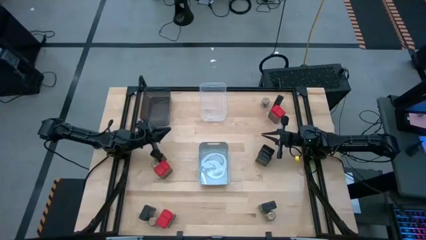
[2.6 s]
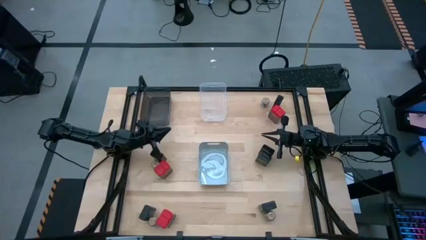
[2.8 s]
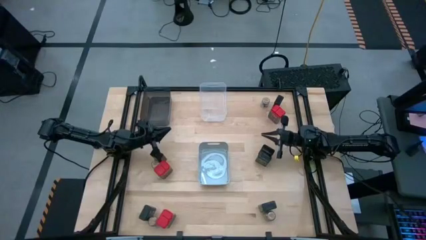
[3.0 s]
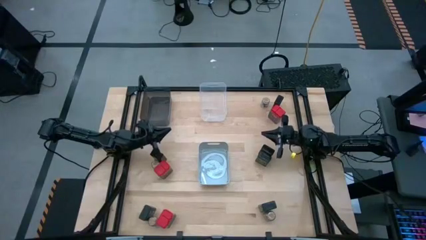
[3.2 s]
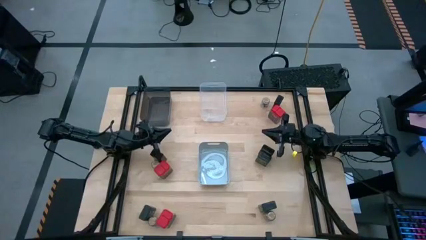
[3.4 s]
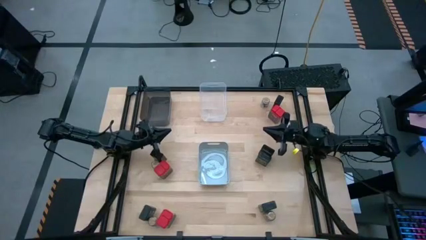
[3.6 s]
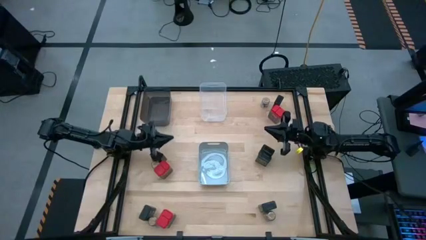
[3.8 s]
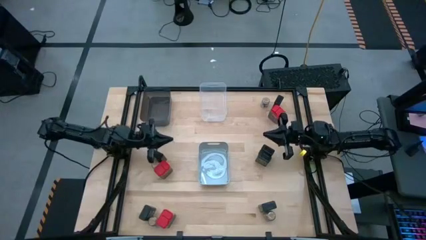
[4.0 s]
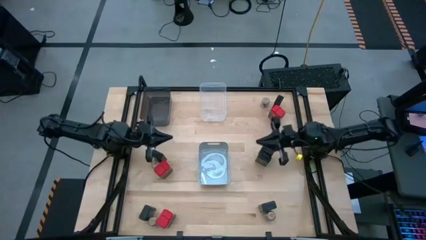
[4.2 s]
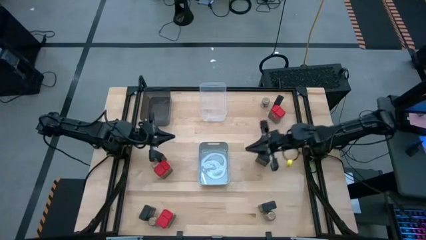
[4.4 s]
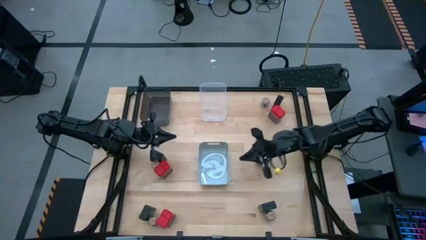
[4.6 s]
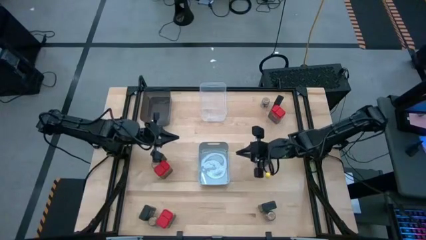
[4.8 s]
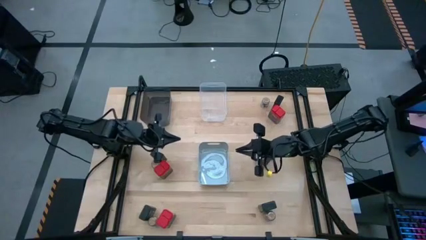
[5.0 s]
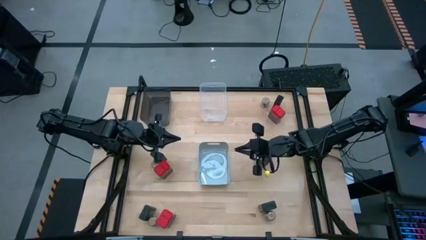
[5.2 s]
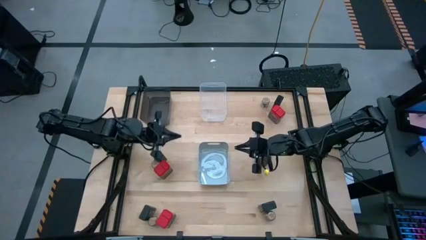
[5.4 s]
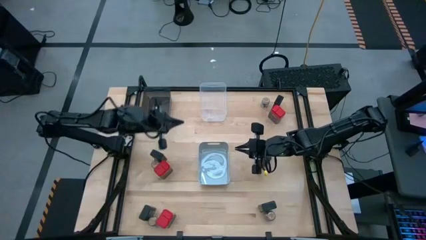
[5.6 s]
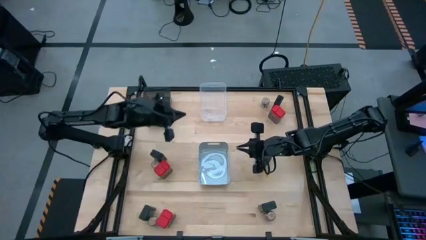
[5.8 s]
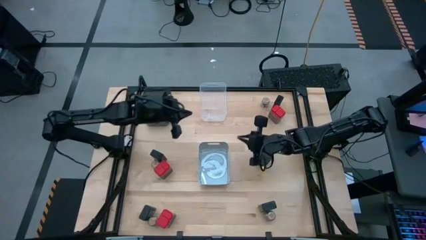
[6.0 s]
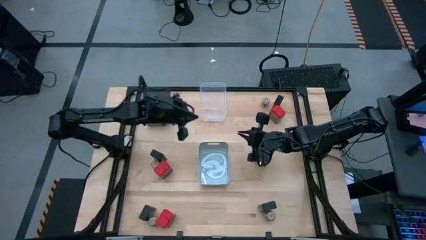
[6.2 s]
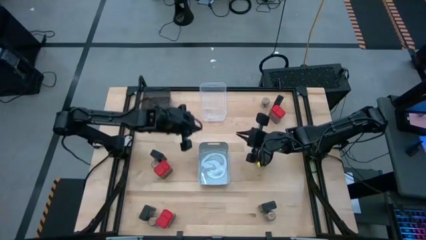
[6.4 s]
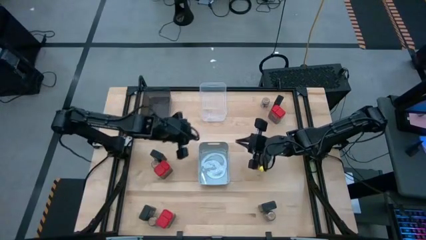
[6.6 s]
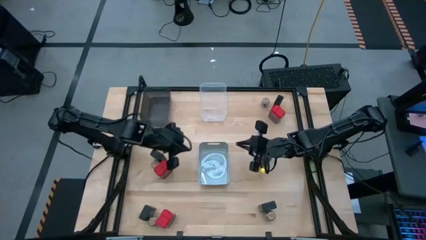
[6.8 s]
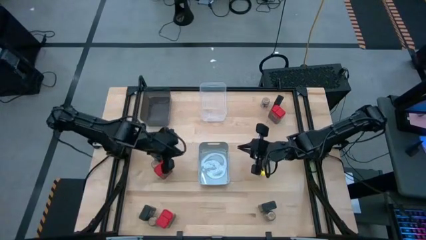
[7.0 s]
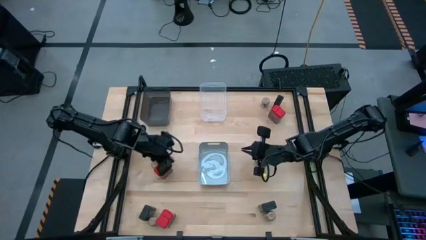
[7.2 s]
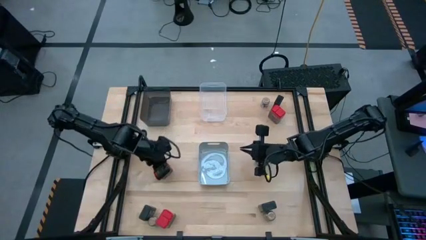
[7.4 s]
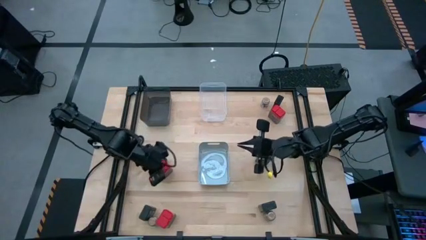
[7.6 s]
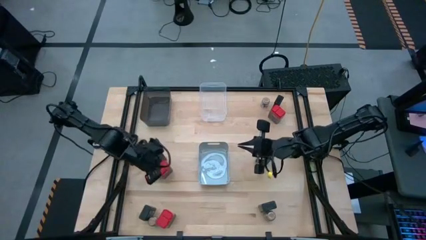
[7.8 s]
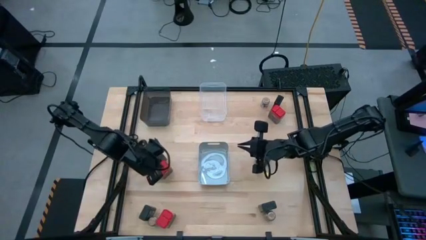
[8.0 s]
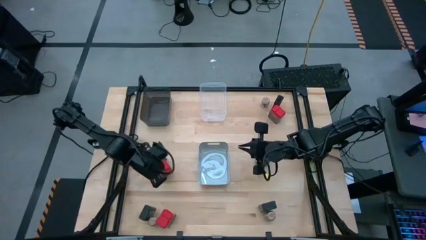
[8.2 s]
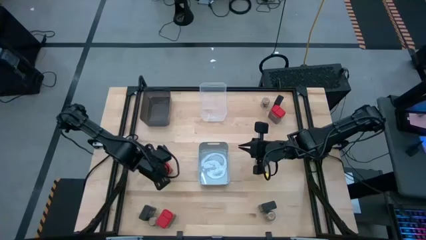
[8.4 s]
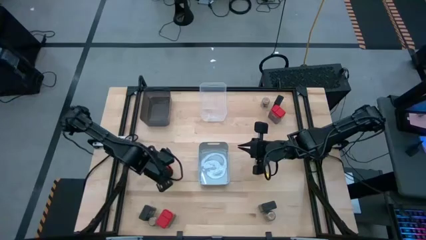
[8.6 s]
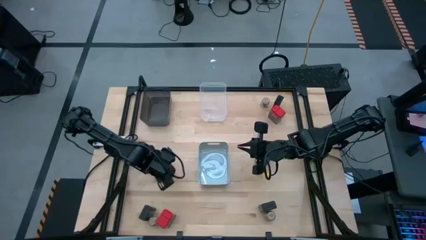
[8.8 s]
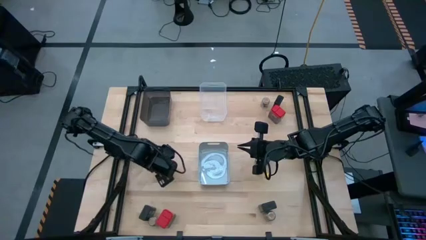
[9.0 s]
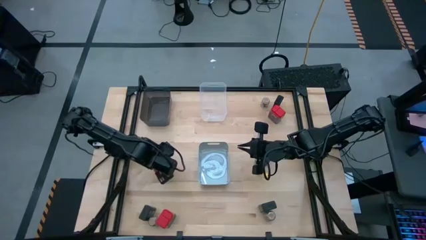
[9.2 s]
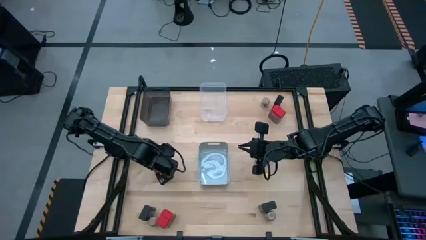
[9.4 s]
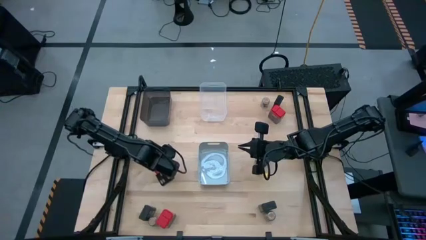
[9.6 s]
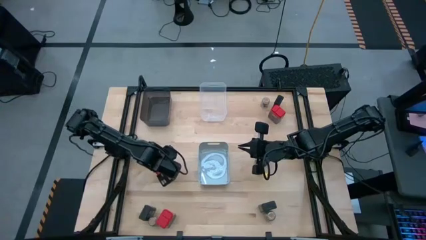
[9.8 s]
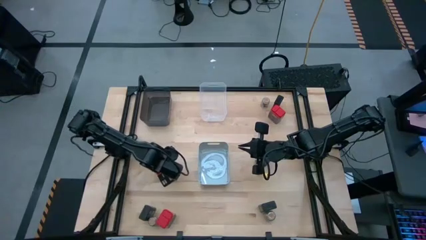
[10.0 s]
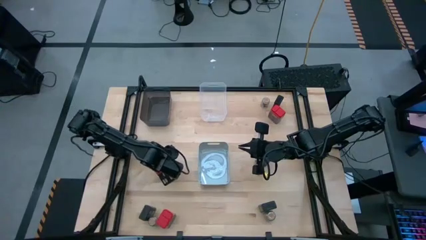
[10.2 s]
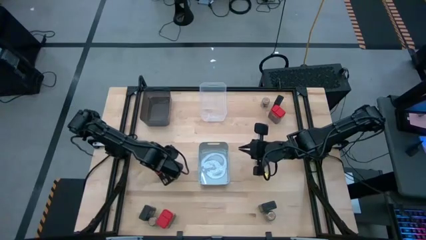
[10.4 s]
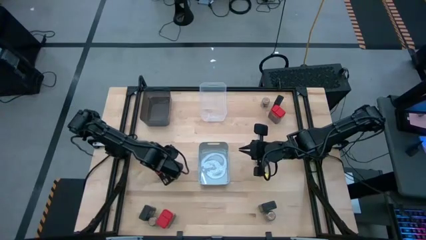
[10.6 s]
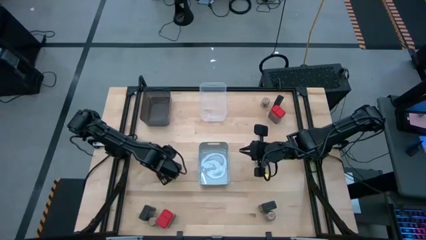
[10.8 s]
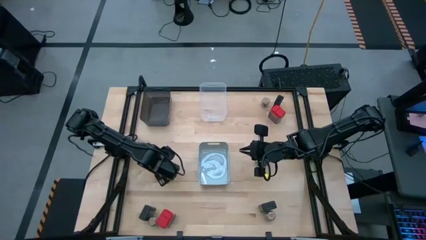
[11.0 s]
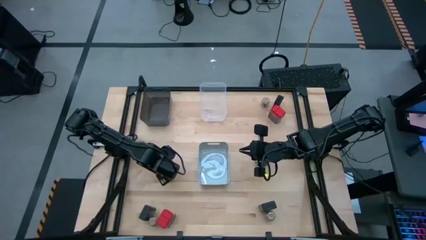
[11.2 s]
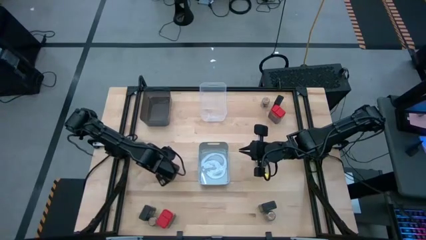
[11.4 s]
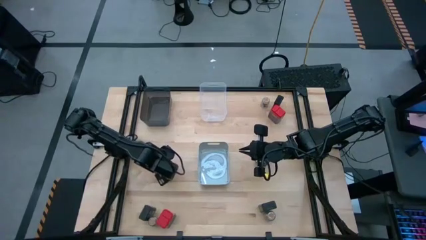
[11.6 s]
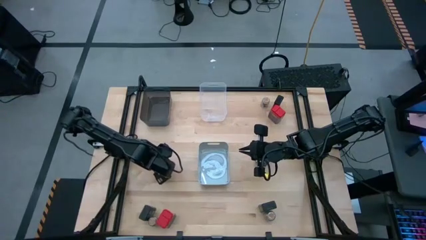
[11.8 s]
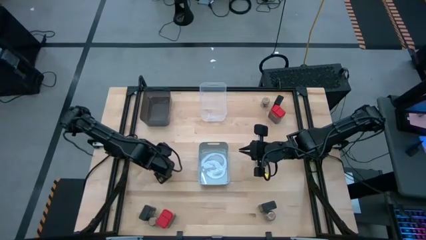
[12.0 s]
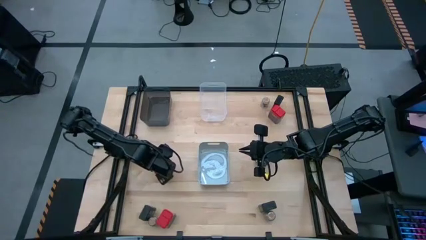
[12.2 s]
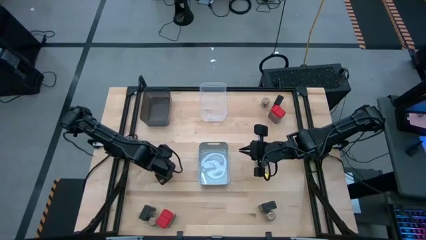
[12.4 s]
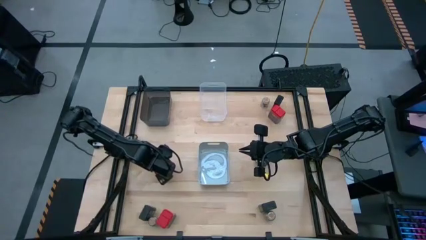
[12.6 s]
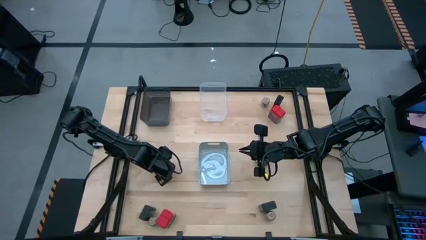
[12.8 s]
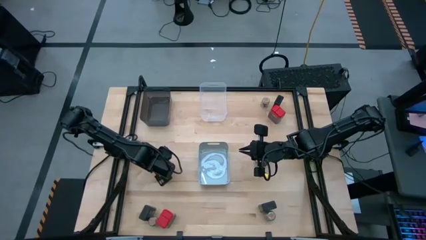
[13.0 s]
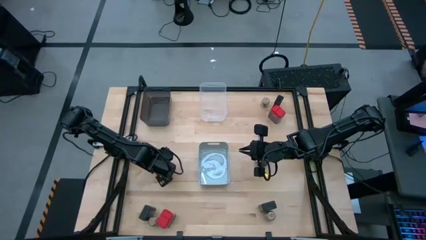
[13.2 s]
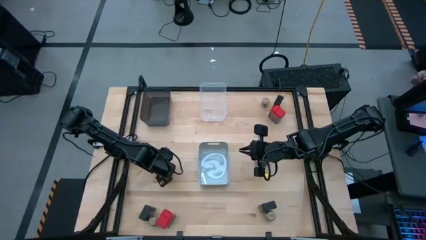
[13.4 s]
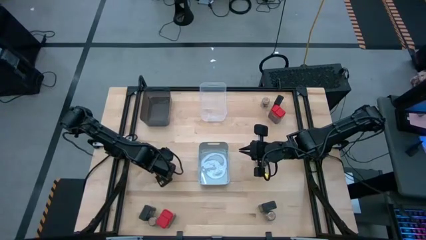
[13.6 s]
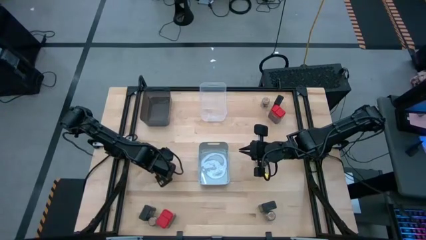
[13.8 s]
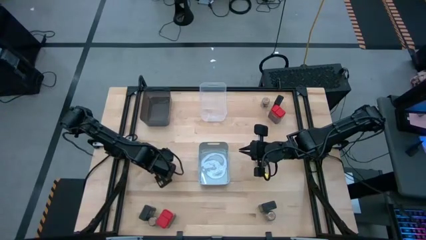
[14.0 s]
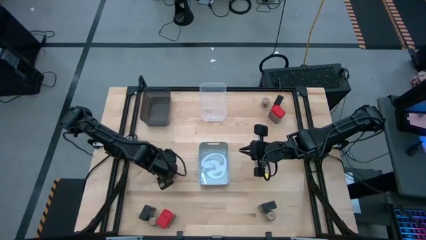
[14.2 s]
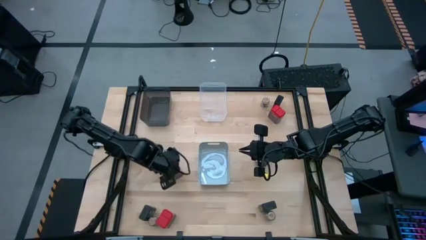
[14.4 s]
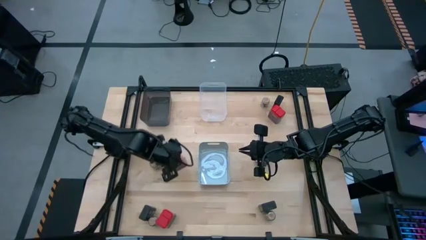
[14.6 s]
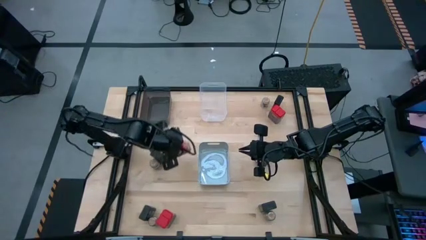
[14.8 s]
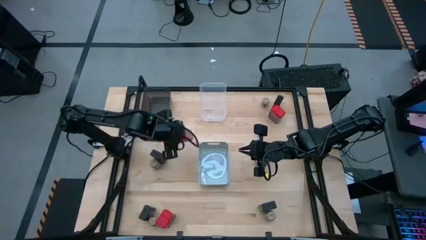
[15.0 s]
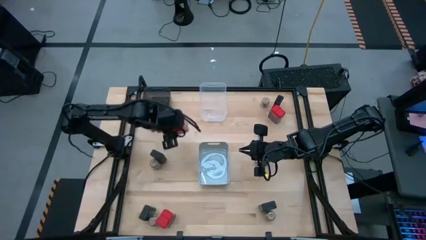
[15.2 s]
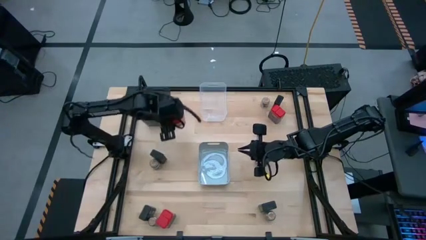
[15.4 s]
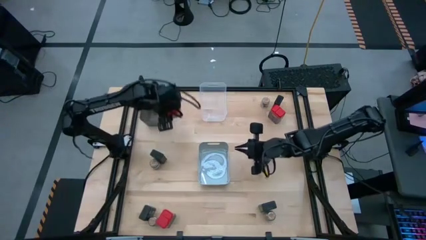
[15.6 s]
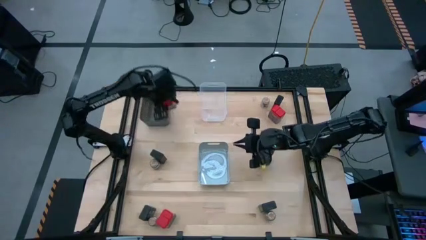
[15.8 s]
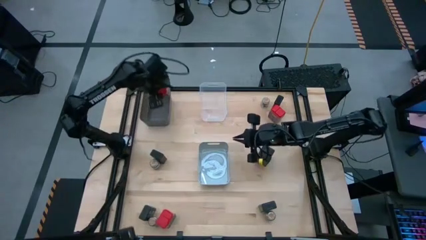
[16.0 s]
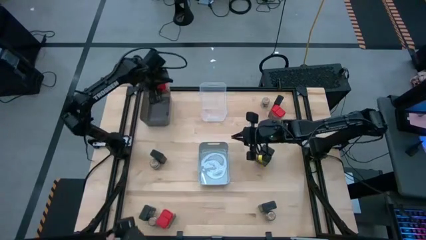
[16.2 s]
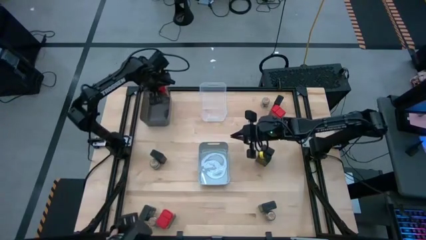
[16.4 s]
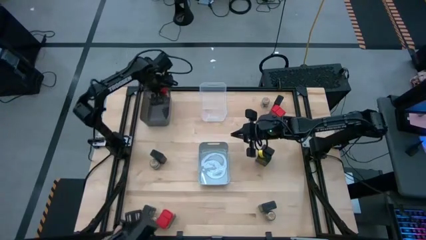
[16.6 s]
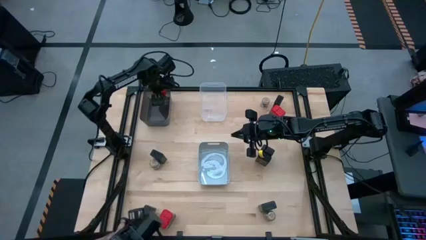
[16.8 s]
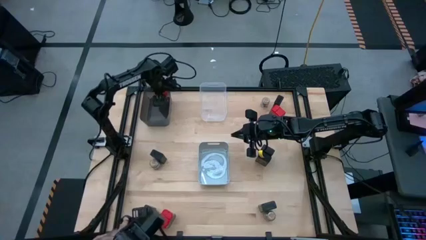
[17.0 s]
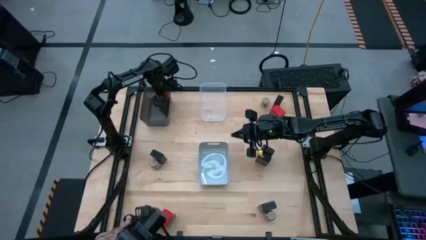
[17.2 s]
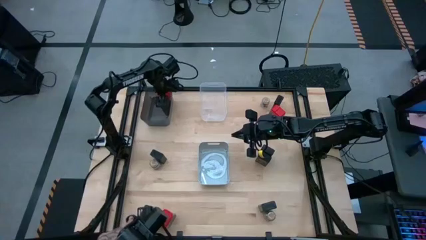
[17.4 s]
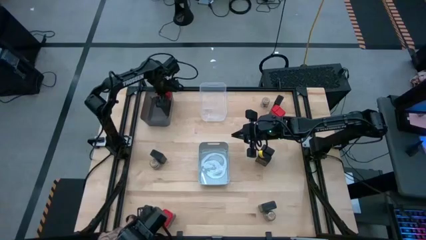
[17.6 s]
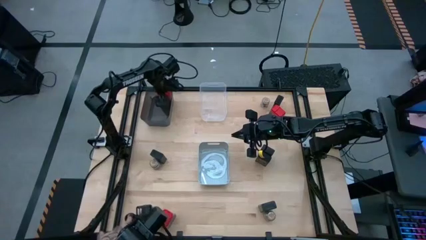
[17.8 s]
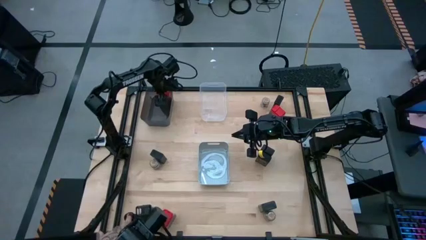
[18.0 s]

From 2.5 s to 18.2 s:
Task: Sort spices by type
Put the red seasoning can into the black transparent bin
